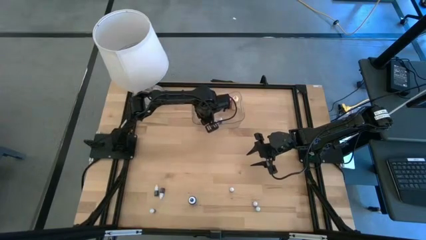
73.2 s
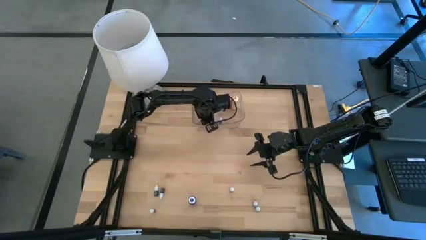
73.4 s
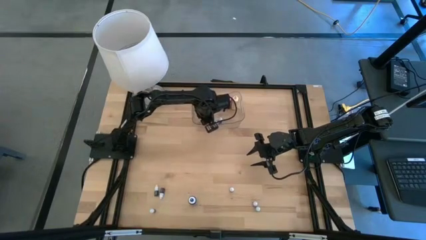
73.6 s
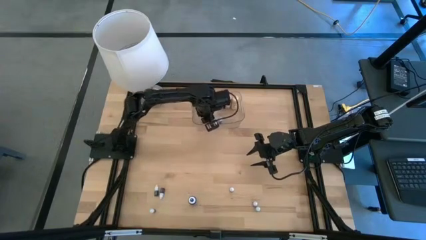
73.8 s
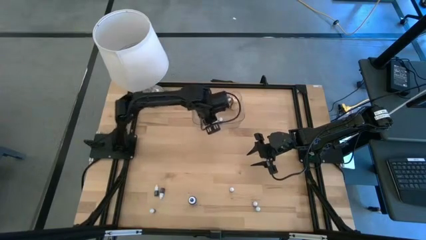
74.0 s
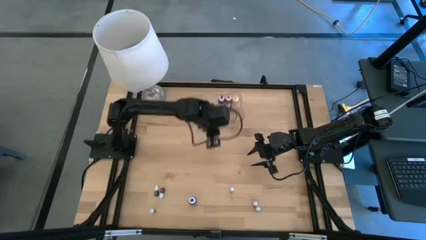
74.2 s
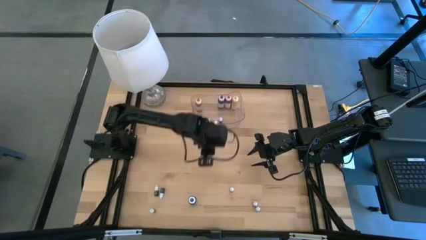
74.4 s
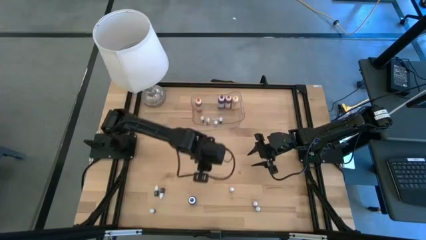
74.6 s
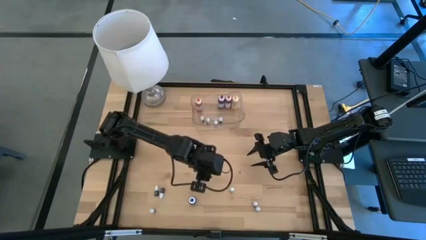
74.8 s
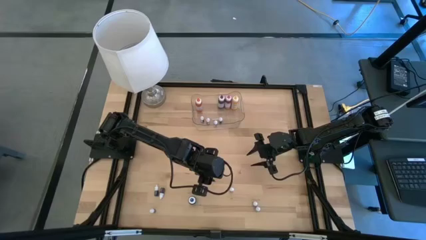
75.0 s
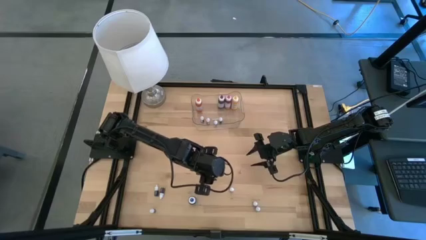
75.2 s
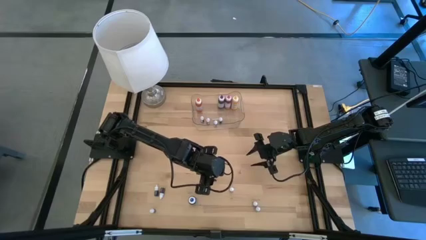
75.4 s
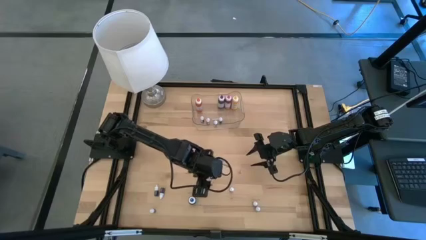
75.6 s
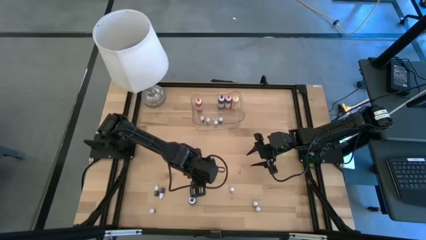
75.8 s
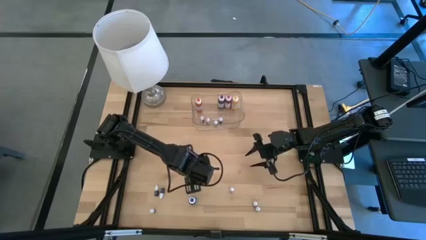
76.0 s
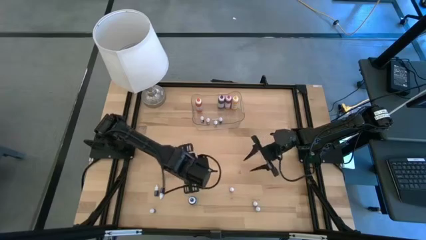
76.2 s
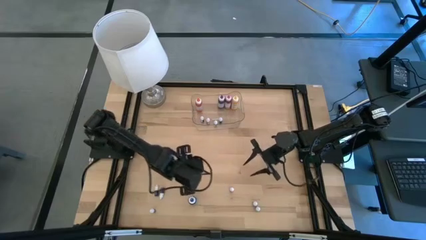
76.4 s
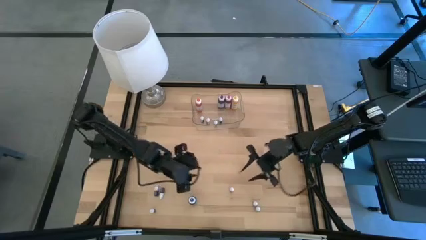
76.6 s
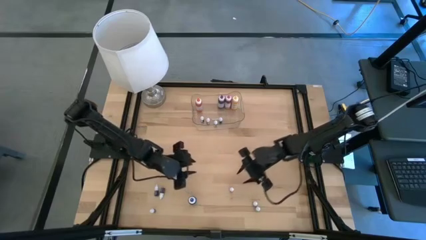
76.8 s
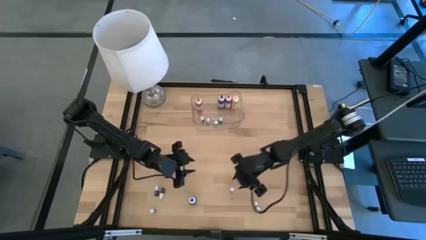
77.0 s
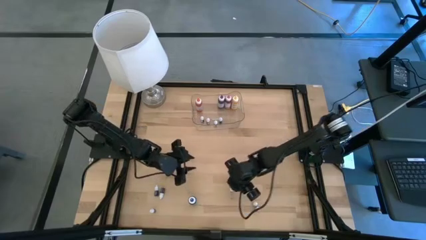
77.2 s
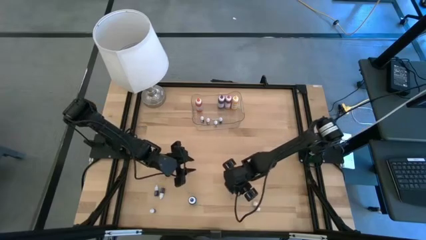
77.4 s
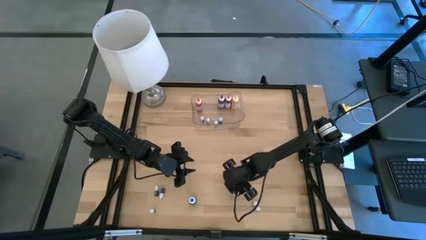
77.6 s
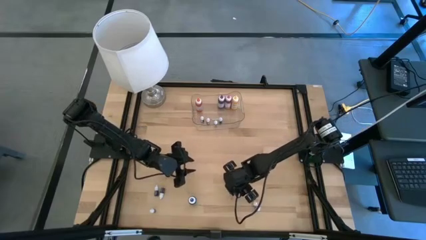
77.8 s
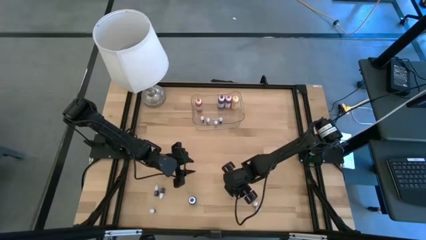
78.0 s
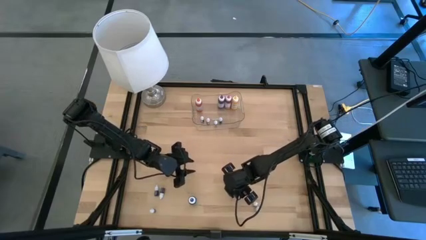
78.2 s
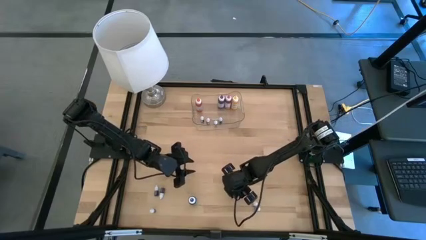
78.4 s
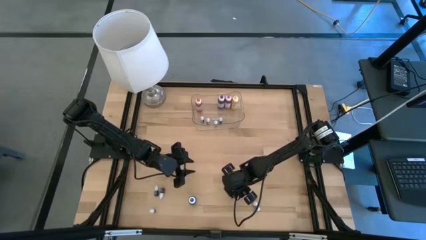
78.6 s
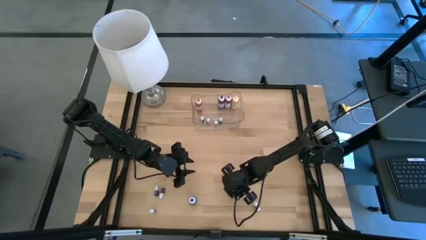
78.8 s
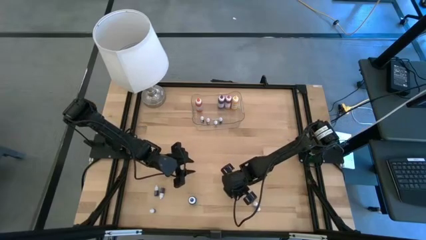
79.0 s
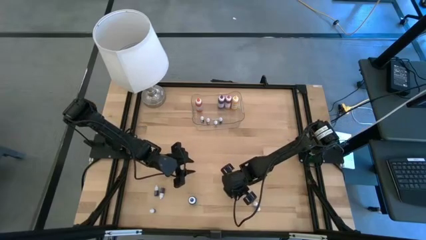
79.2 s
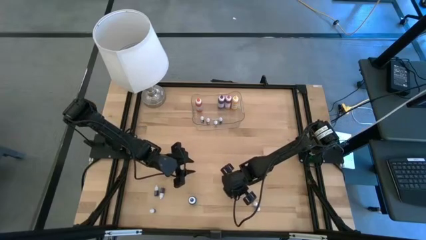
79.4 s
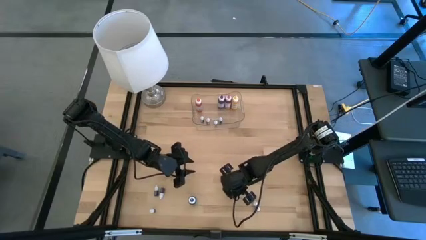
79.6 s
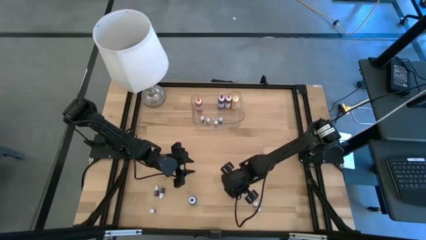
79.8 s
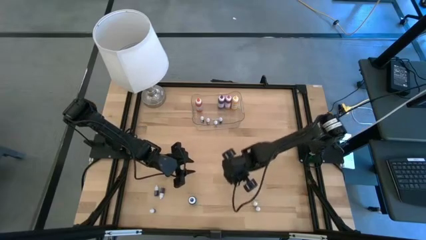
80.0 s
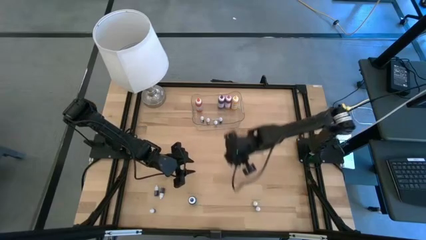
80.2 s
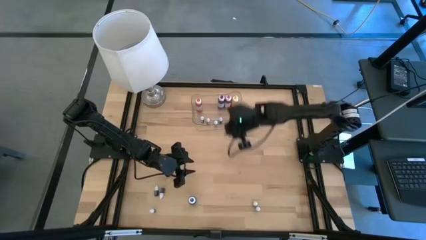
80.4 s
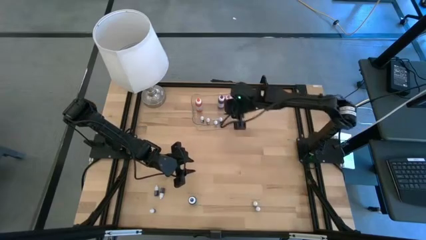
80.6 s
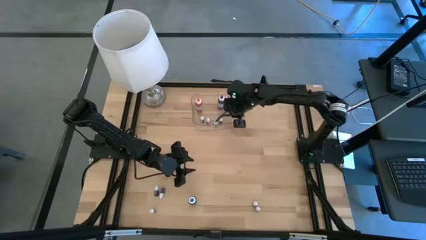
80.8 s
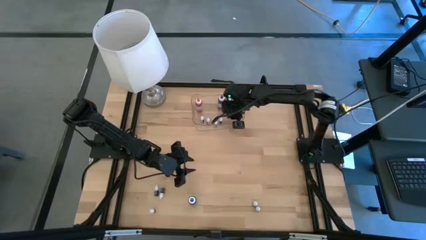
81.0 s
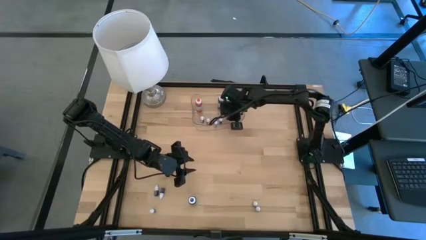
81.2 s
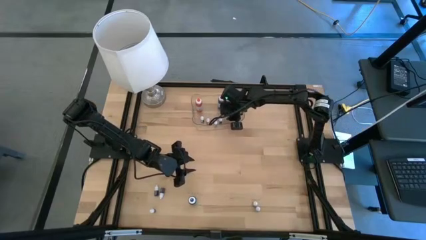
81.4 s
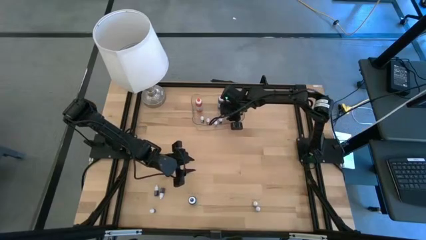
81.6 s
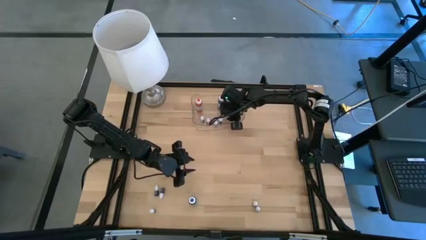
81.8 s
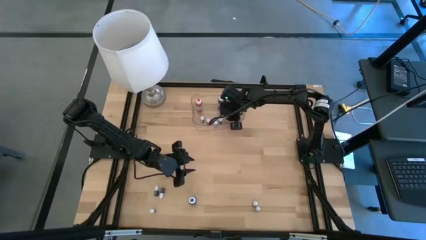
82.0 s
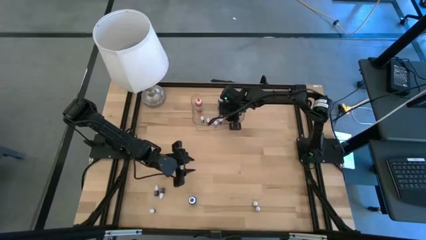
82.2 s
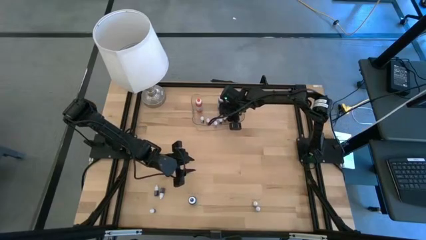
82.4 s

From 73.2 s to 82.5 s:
Task: Pick & Place food coloring
Put the small pink food coloring bottle into the transparent bin

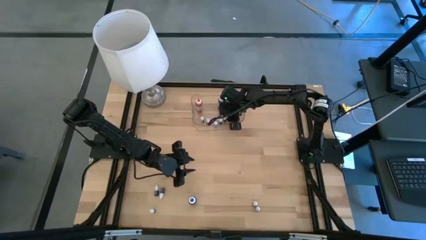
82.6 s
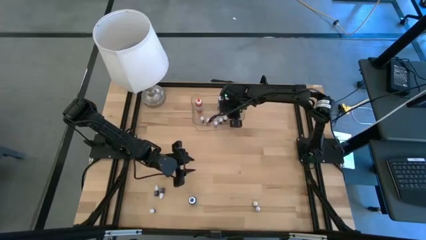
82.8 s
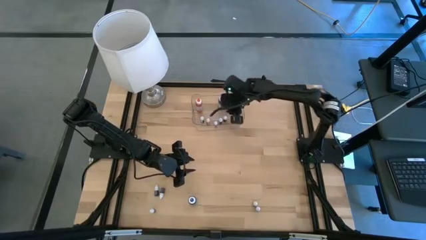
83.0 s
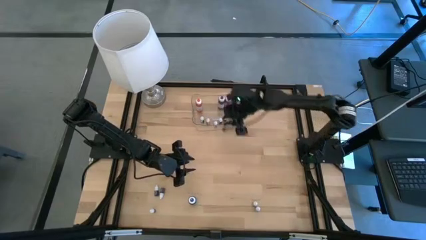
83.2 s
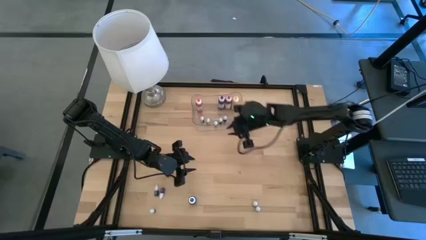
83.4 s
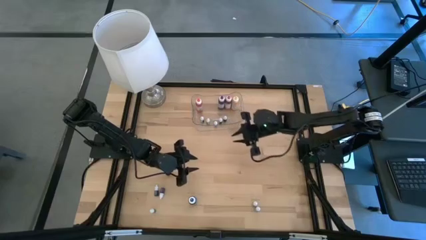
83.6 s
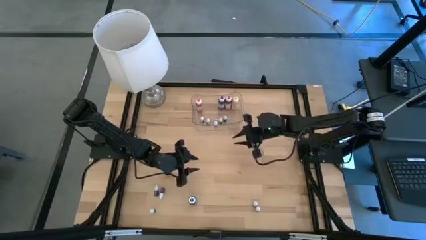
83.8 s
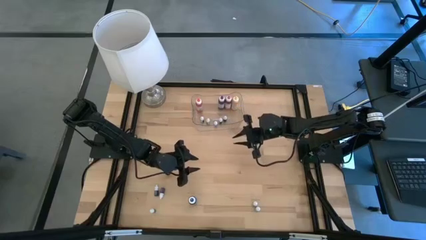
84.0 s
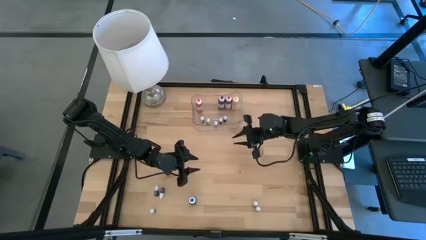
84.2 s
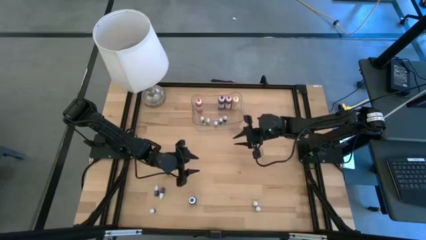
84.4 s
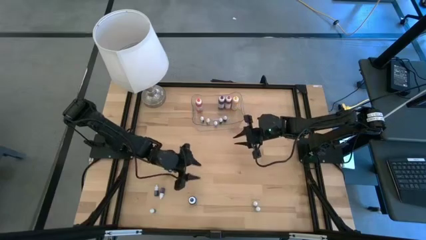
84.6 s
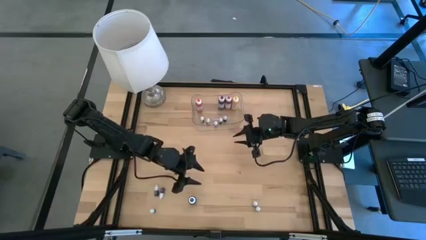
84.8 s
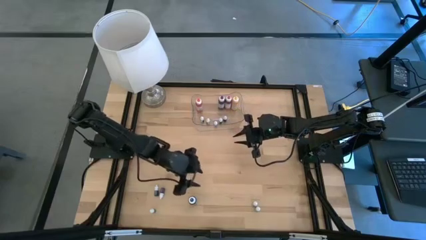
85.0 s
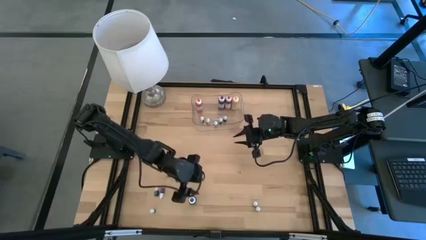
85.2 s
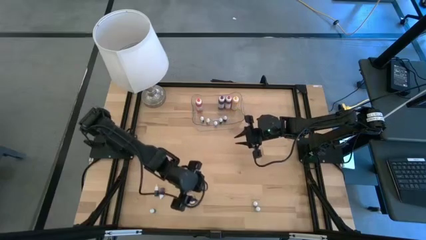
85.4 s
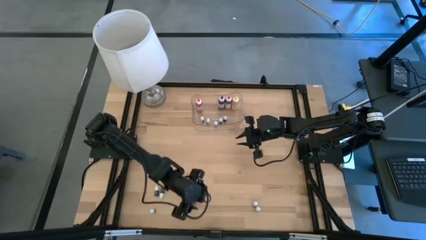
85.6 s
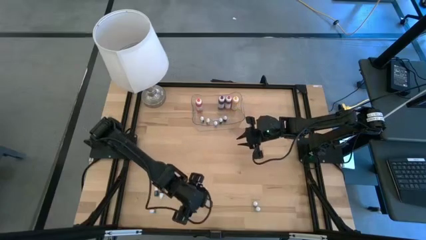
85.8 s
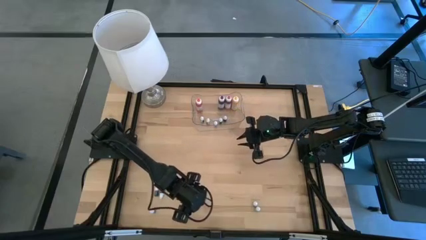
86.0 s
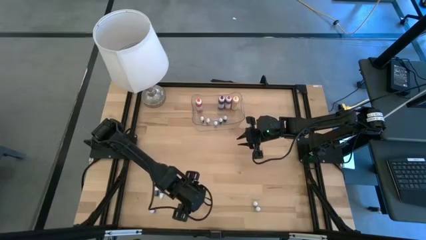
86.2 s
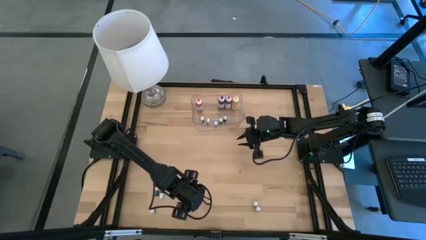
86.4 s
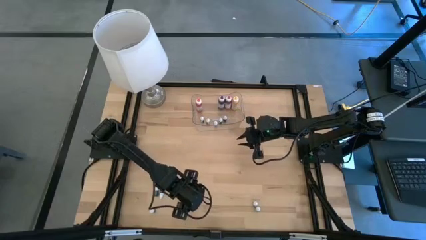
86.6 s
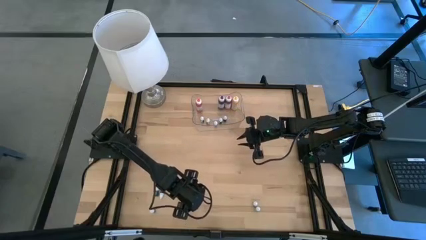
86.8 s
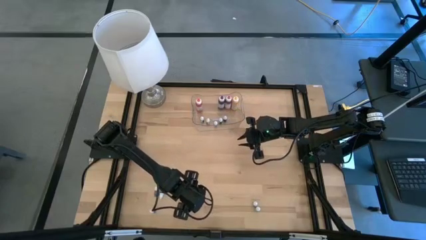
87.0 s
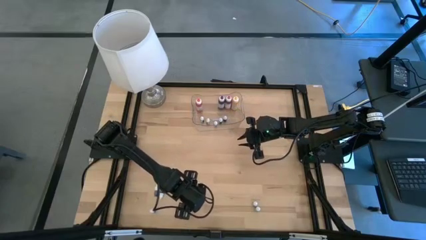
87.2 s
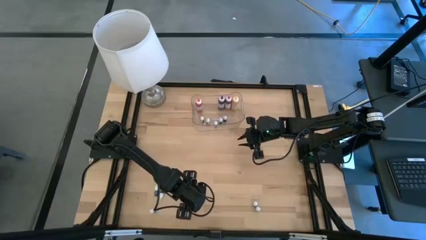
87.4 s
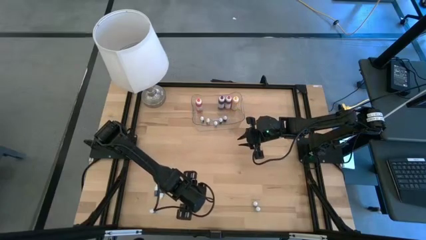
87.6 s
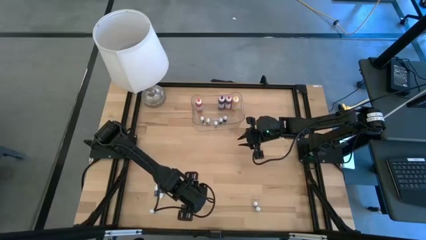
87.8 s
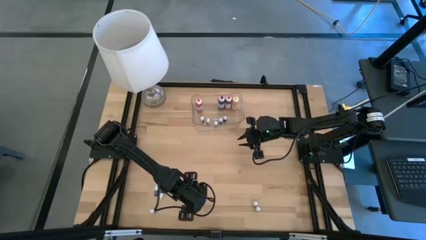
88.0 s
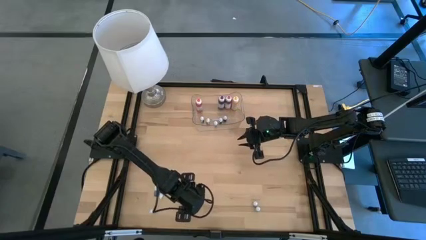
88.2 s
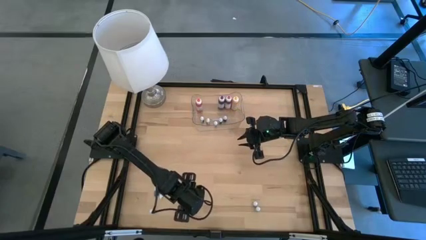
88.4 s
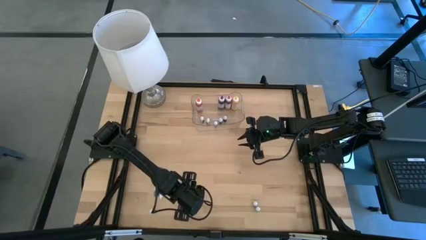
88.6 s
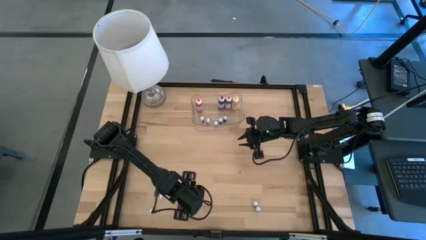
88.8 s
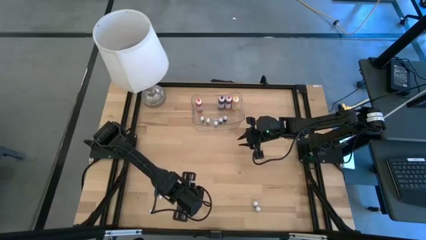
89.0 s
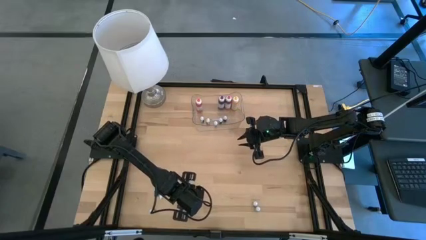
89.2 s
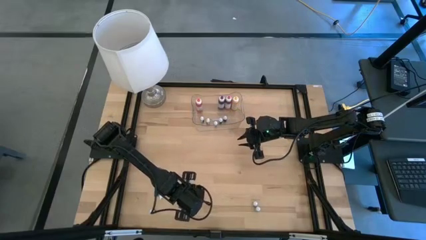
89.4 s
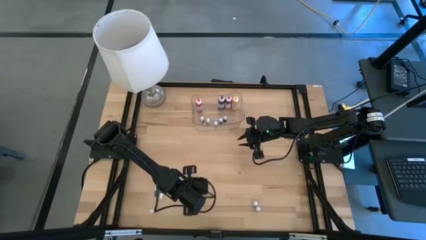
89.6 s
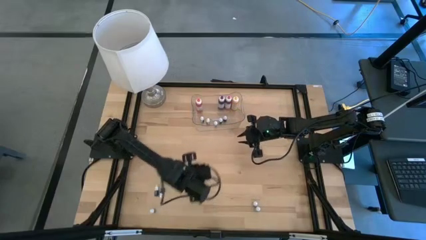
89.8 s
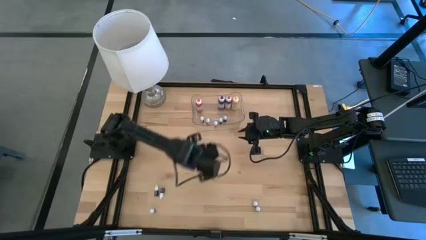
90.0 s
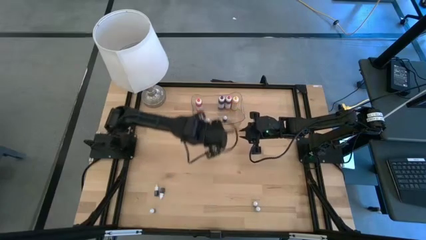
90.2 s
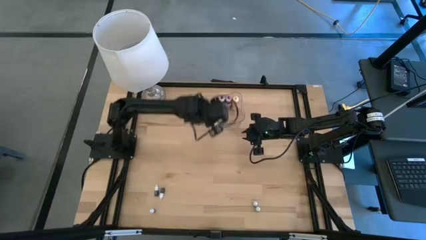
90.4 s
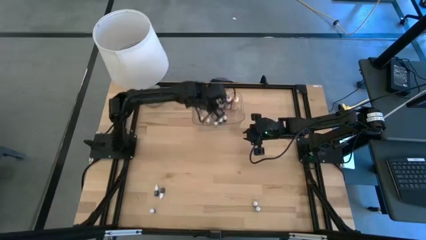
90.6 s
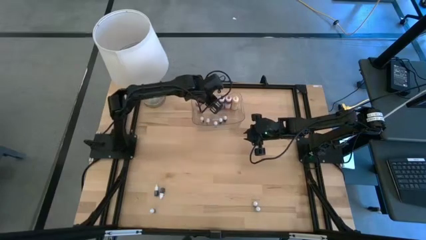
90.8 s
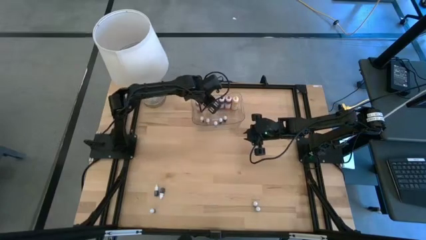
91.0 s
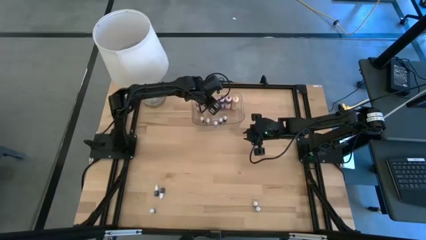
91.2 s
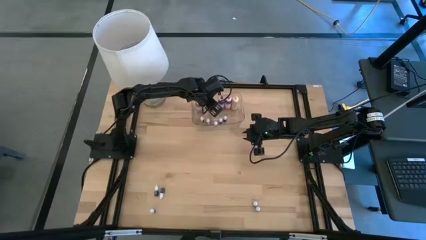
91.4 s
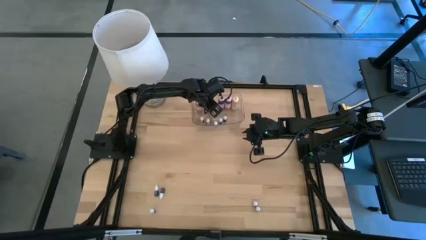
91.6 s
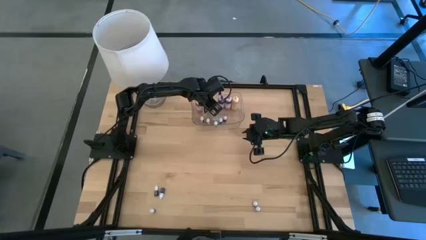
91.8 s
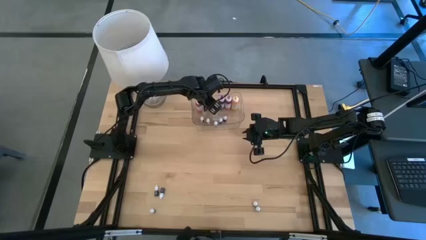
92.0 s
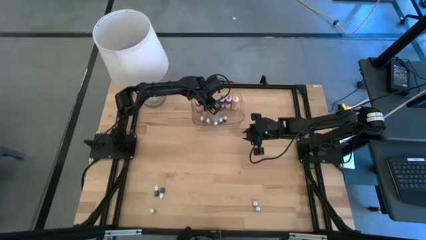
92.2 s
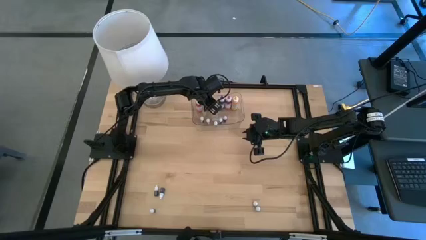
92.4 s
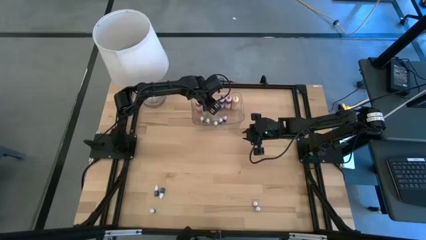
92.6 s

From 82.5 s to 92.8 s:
Put the large blue food coloring bottle into the transparent bin
